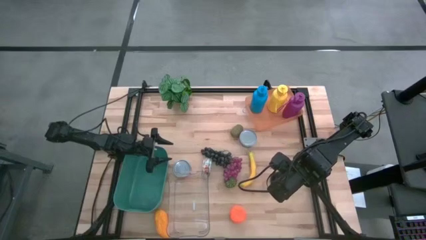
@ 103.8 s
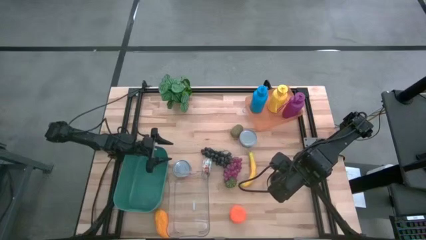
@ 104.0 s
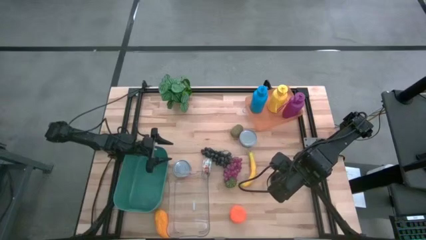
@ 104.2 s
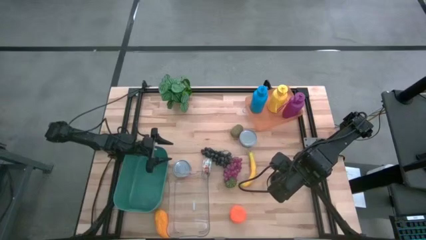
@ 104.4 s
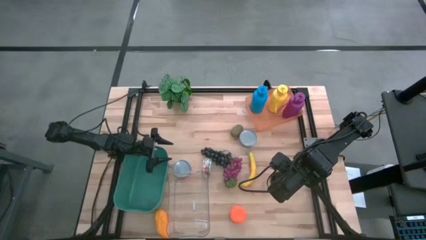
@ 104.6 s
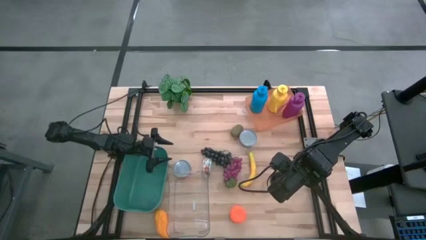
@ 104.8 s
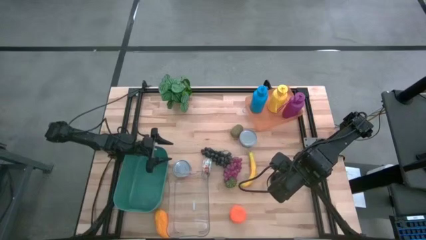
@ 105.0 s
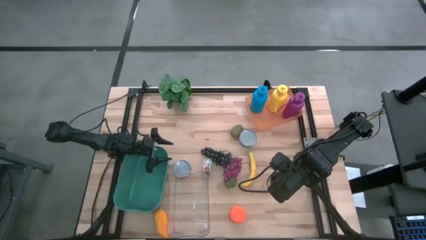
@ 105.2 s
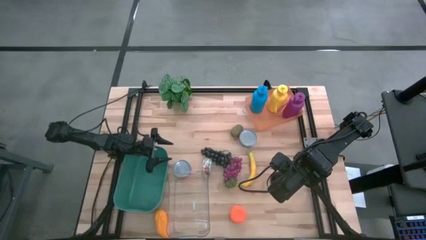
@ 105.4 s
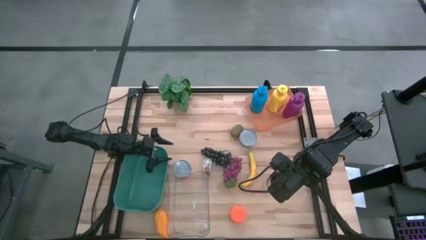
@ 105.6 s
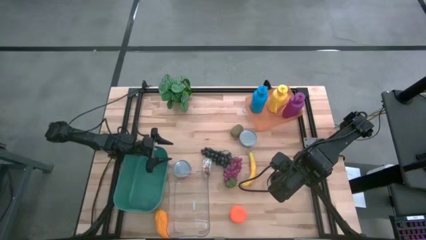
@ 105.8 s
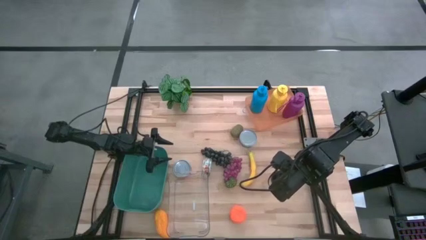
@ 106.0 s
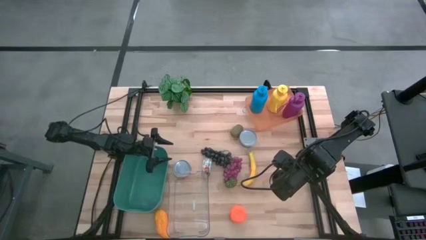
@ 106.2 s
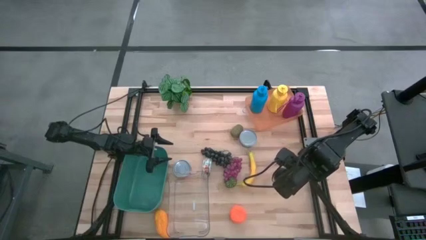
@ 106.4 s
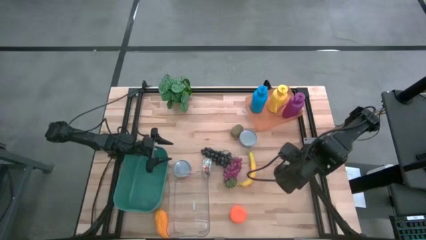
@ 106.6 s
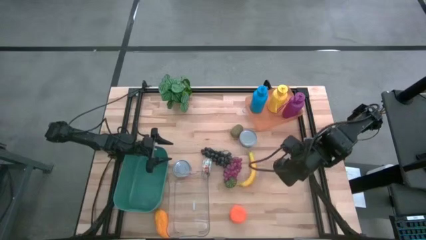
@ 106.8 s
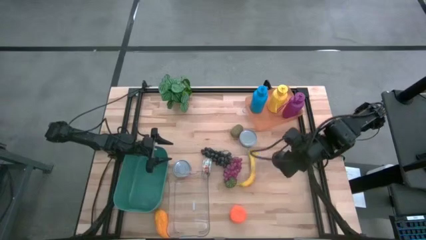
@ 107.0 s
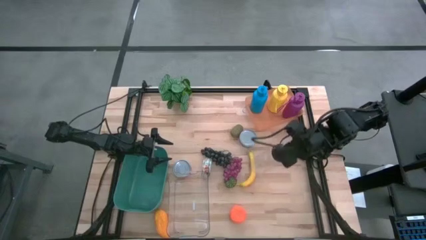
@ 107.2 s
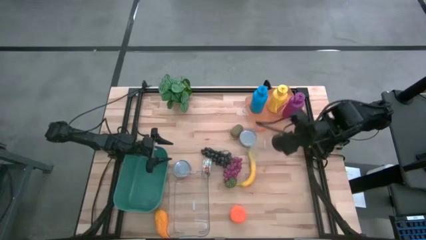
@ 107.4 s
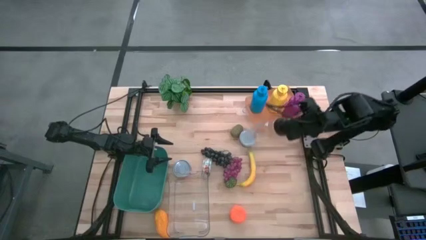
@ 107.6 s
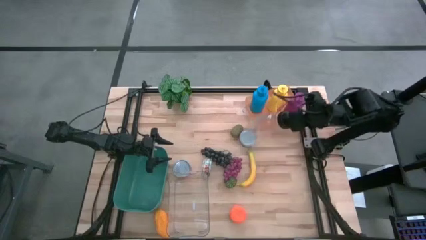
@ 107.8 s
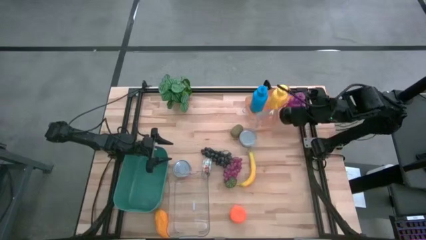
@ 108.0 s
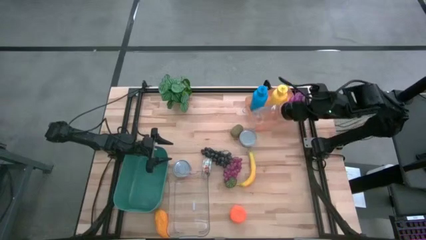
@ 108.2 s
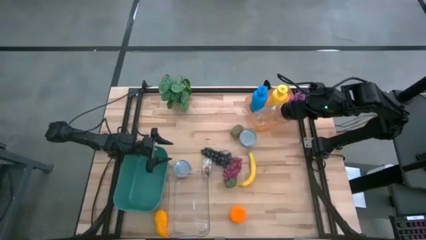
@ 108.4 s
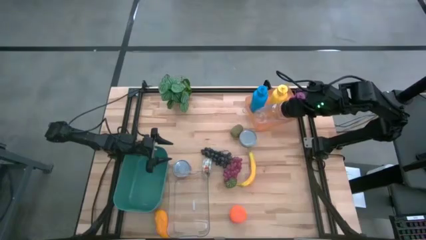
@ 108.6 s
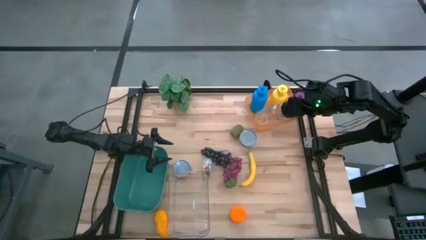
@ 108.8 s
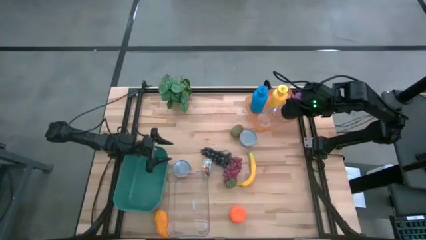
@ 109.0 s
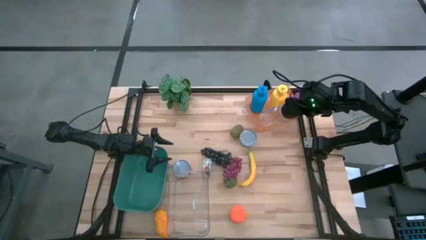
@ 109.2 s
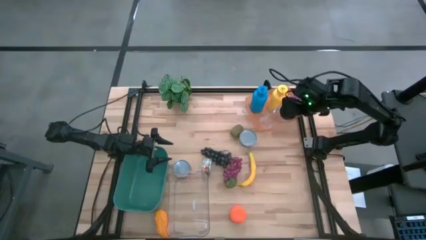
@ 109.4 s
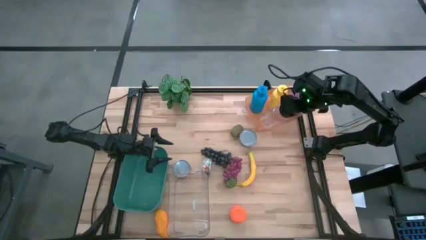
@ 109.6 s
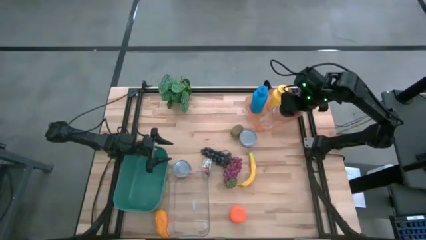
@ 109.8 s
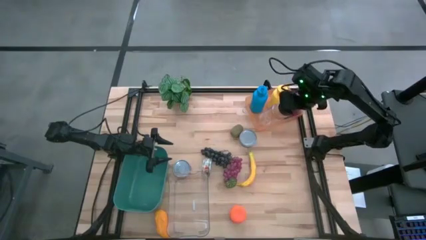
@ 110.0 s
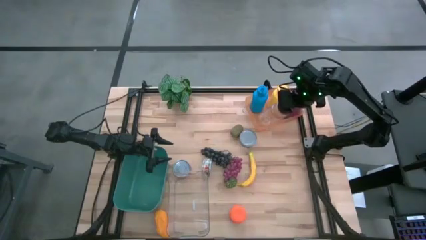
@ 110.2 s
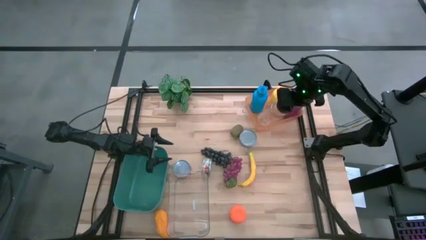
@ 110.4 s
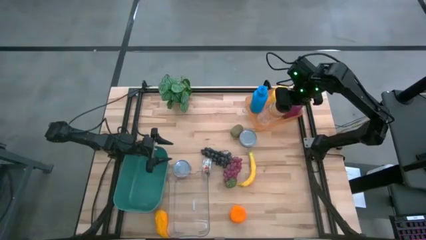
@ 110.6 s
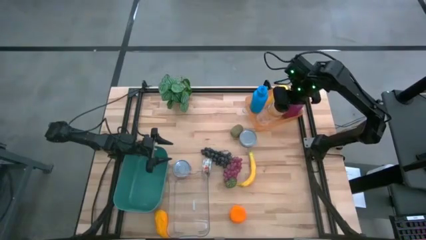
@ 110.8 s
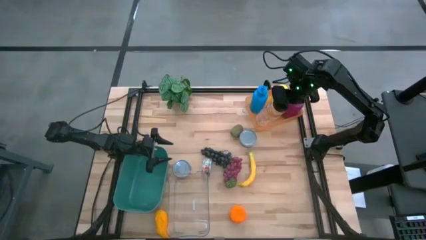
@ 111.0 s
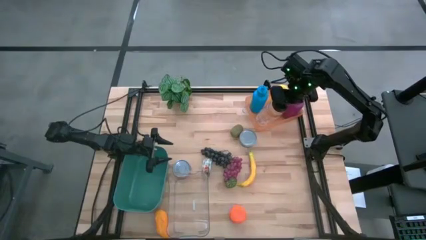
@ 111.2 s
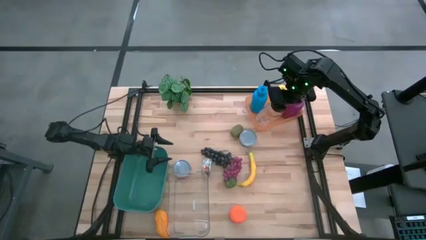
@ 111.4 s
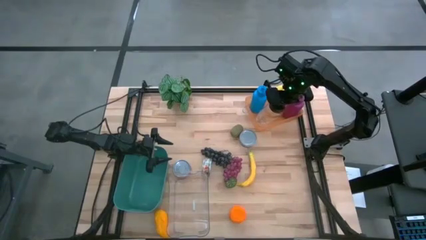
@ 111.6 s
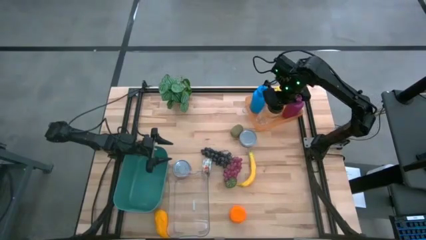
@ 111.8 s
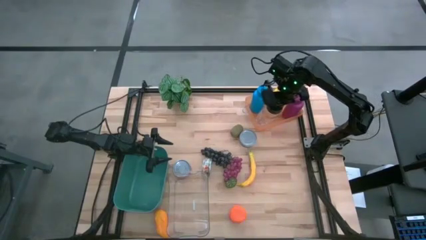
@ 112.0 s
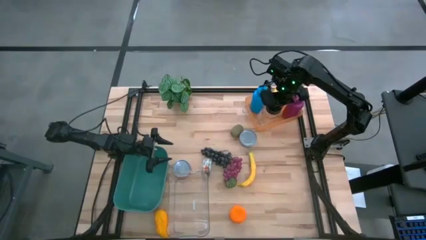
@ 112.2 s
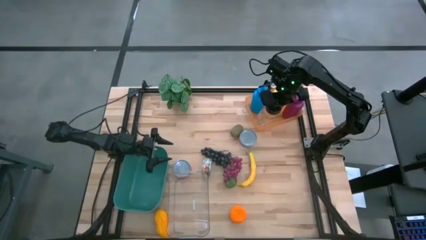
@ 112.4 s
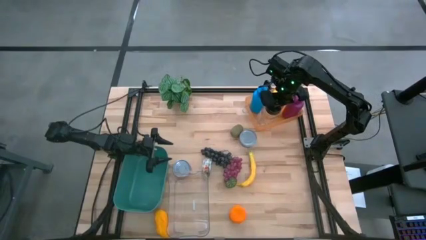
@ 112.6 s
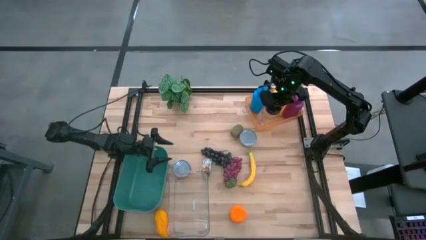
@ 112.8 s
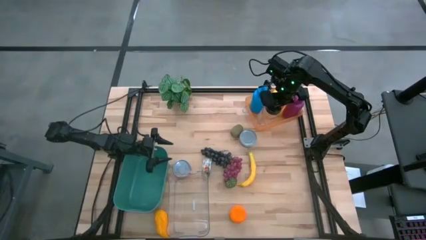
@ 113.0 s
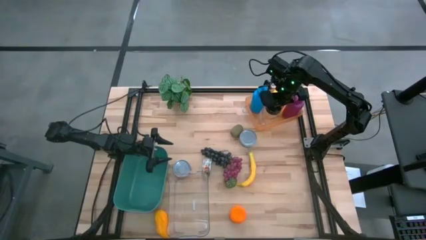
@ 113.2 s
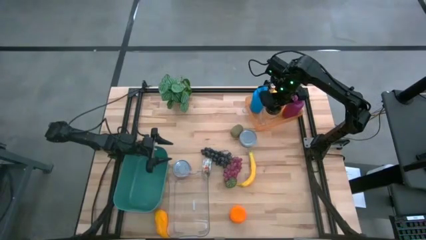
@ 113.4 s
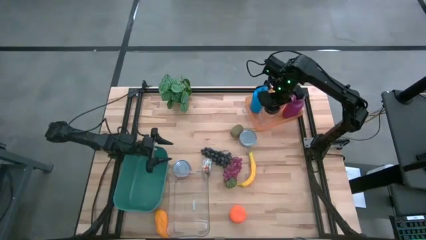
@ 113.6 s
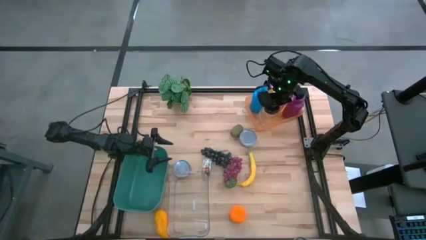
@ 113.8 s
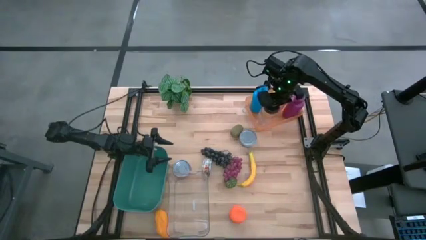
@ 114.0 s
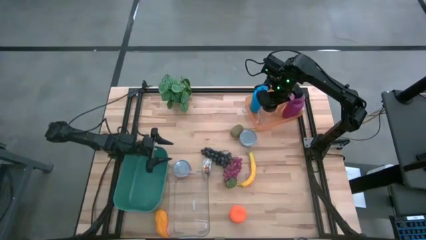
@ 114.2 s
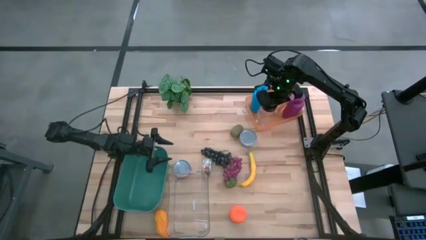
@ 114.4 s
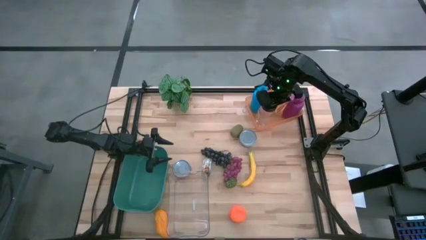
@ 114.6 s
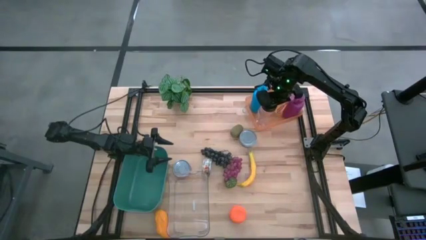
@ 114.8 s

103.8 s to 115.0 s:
Task: Pick & Place Food Item
Put the transparent tumbler into the orange bin

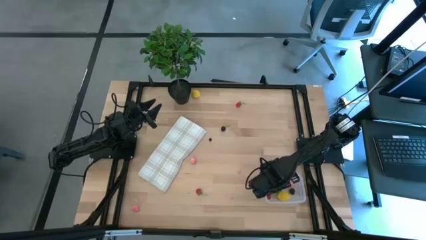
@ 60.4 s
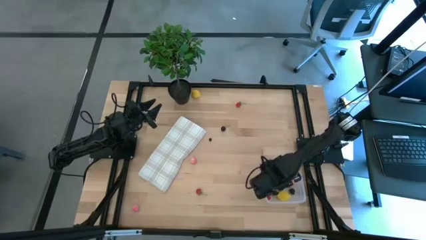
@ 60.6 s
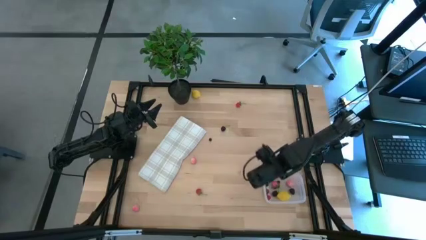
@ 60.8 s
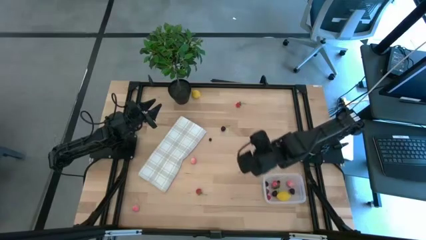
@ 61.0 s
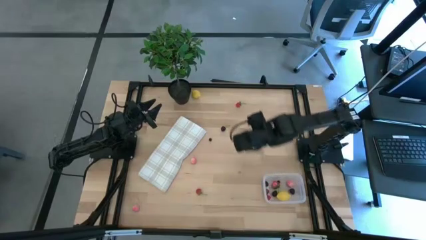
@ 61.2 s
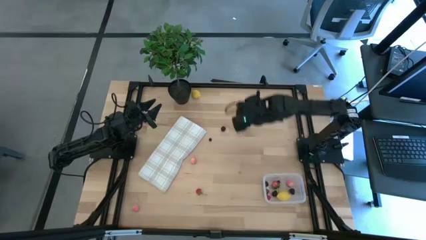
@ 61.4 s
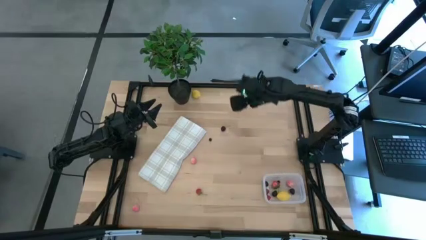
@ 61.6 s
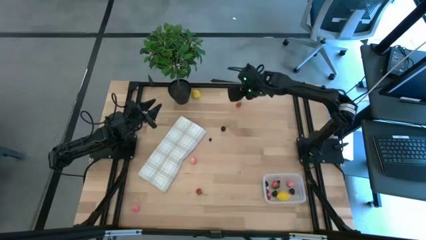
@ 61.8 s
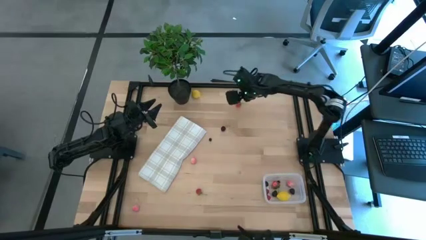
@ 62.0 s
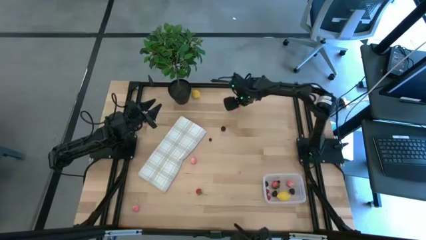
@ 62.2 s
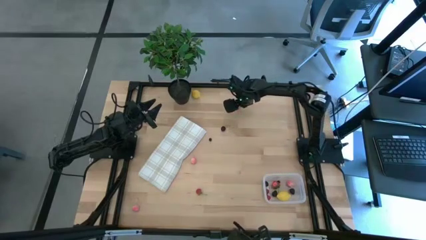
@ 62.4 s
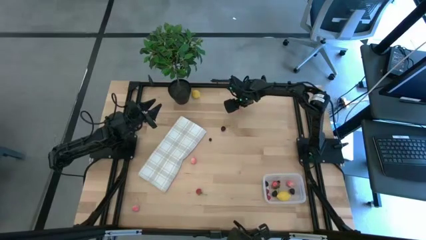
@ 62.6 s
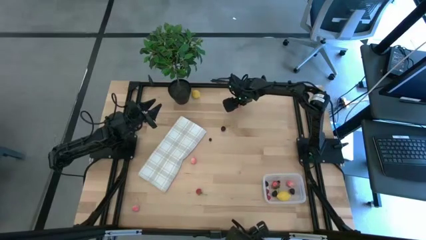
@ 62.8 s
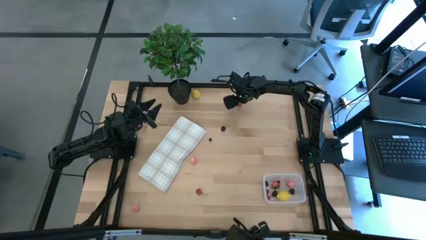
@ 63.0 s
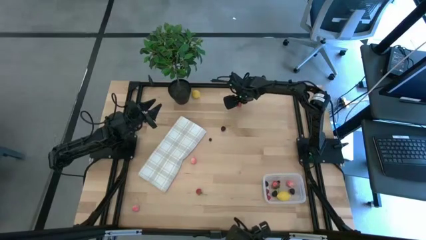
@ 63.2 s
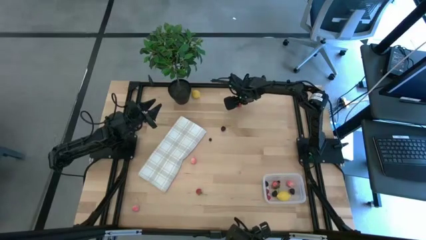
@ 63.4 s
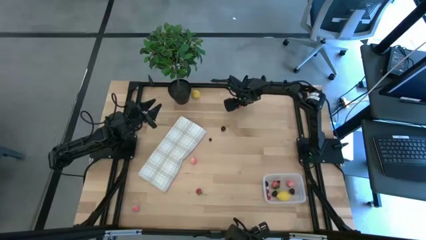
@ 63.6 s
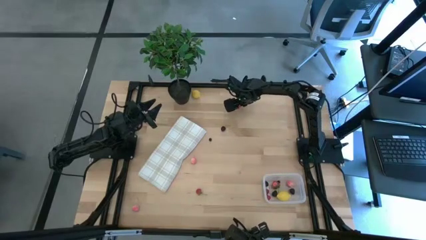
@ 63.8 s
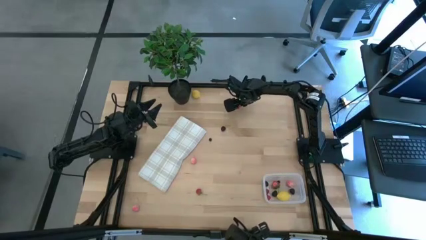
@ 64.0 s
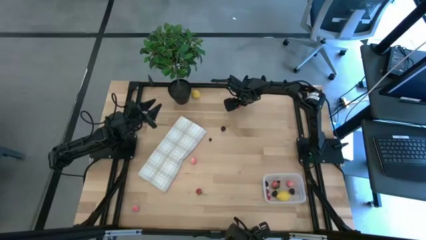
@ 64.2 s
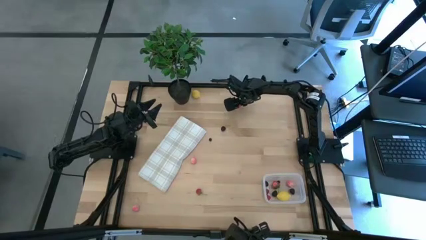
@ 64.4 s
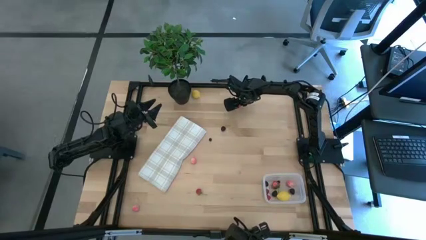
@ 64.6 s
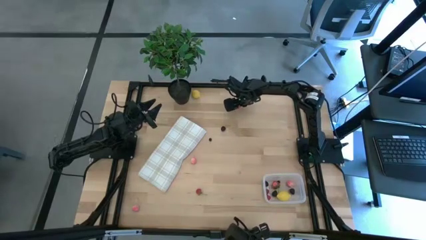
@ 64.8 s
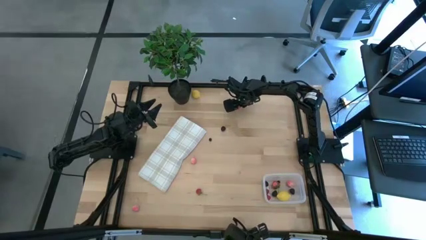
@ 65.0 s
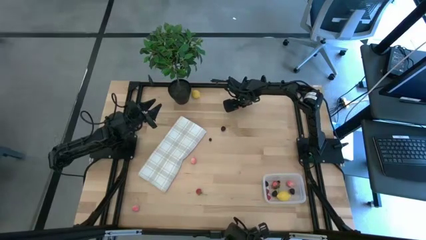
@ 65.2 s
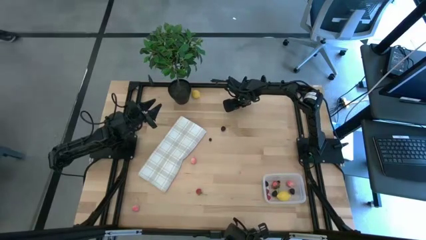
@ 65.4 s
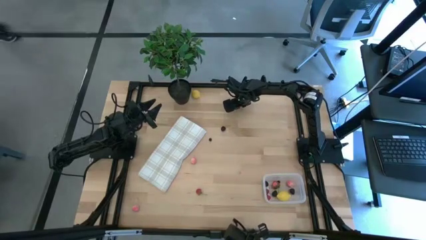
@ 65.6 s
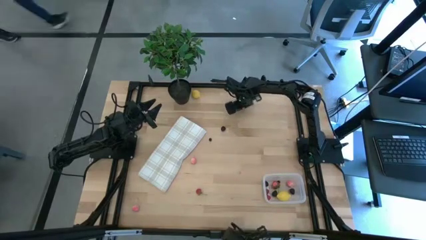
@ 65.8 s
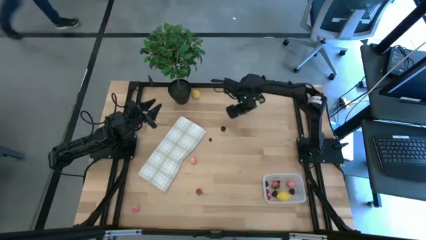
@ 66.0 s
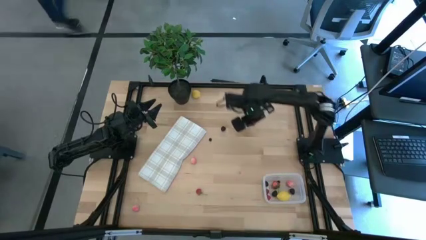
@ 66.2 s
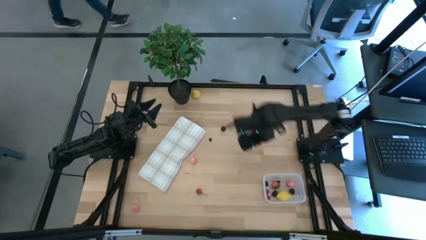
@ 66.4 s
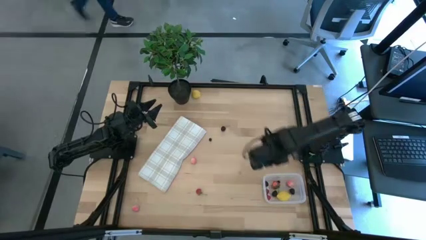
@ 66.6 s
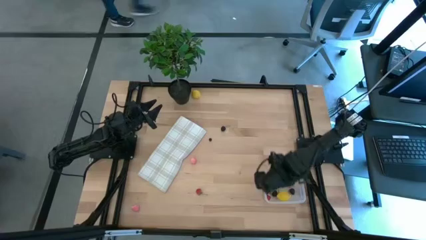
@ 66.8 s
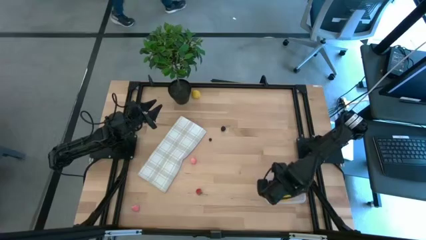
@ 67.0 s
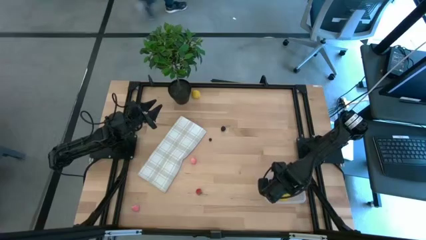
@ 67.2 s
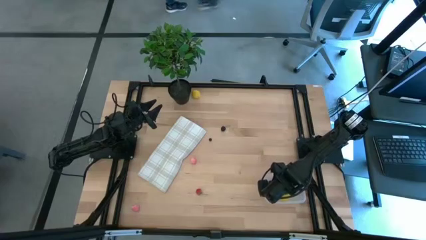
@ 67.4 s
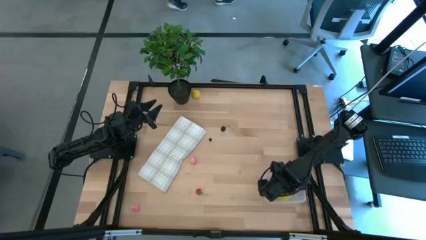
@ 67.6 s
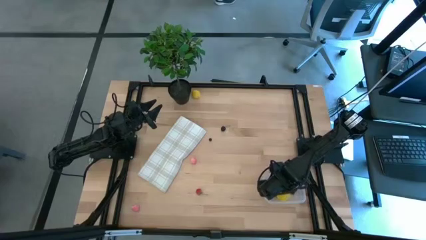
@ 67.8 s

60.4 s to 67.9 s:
Task: Pick and placing Produce into tupperware
Put the top red strawberry into the transparent bin
